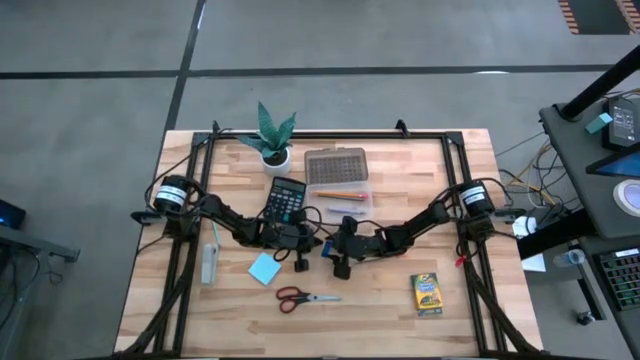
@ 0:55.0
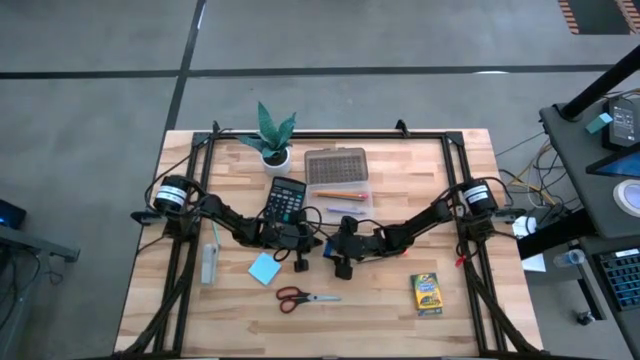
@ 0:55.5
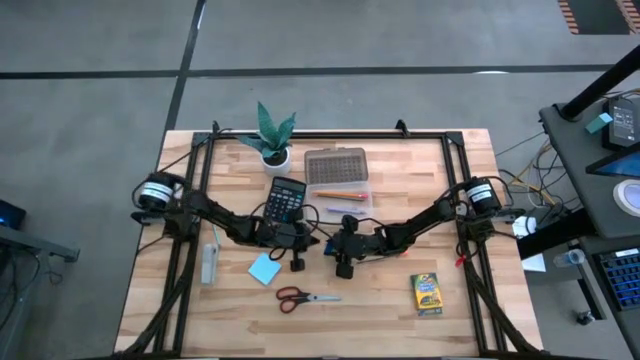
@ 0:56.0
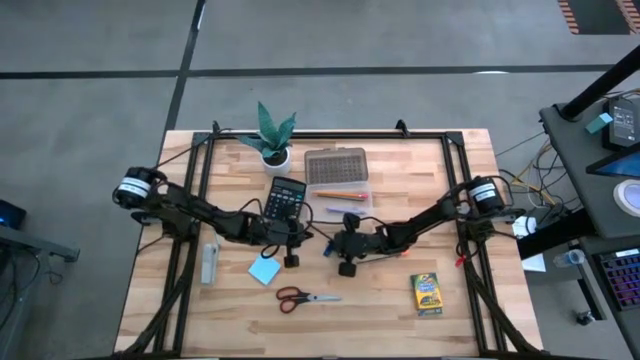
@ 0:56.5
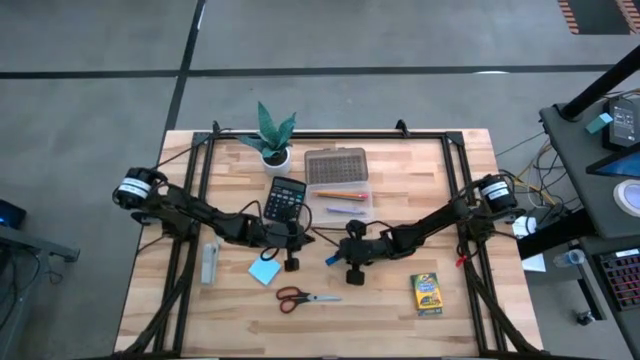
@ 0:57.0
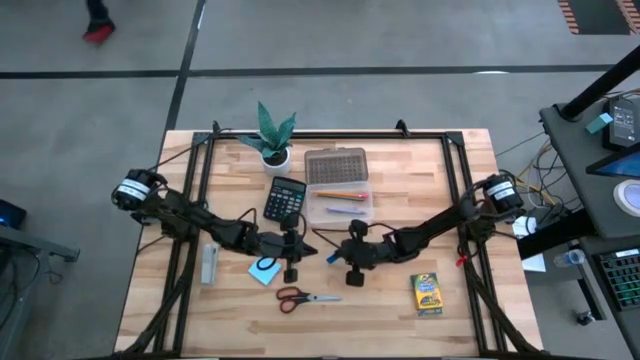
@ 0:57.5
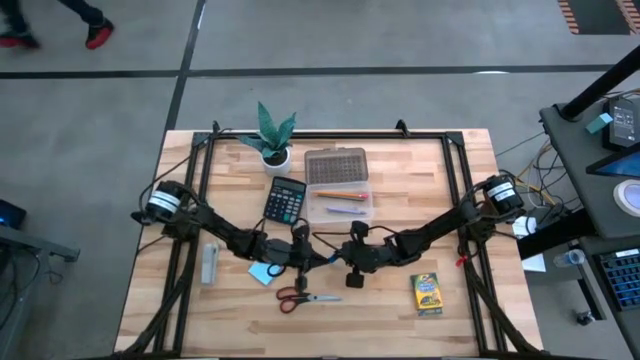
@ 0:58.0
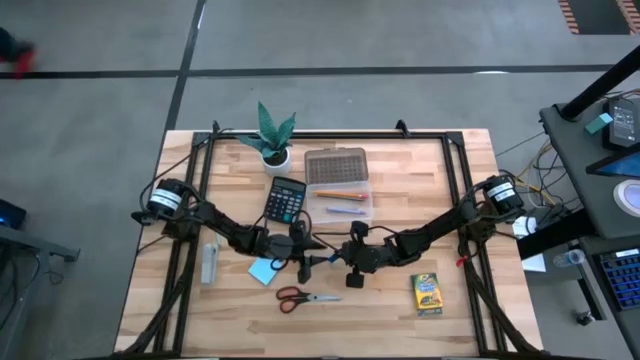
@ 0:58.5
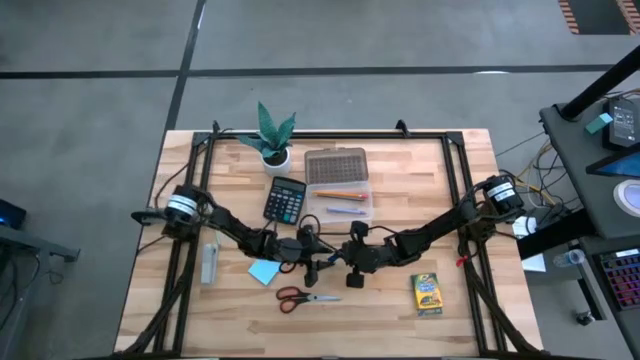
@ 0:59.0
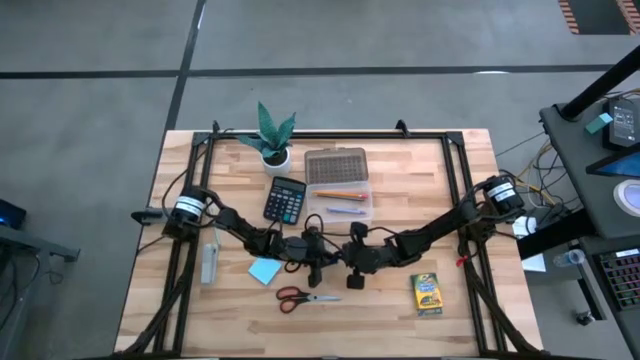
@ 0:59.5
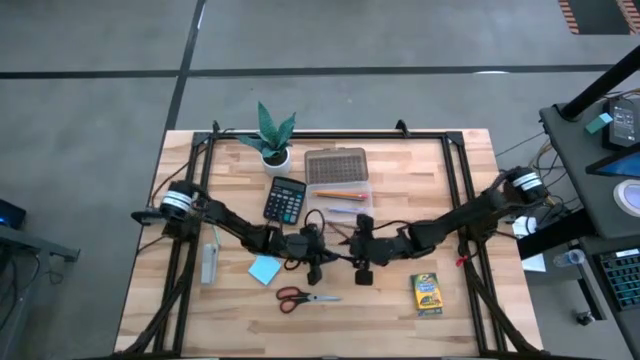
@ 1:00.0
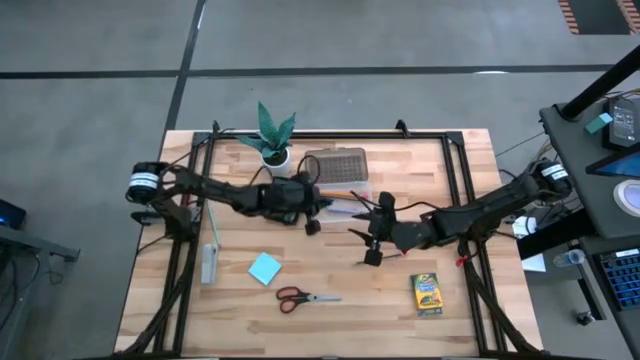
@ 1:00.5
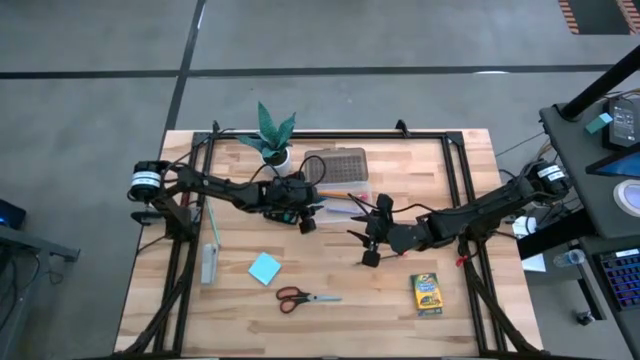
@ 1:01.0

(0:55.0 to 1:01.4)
Task: Pack school essentials
Put the blue eraser into the supplies box

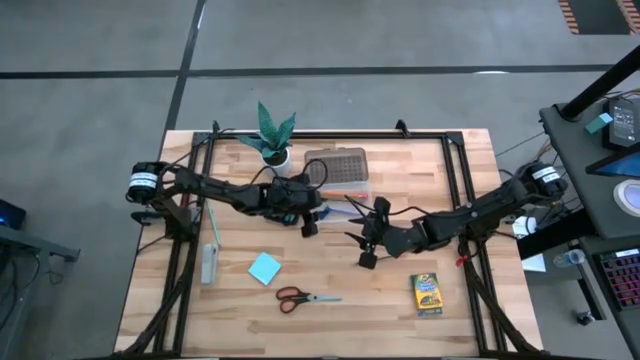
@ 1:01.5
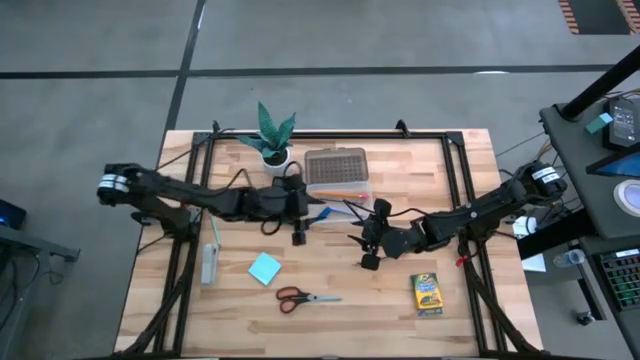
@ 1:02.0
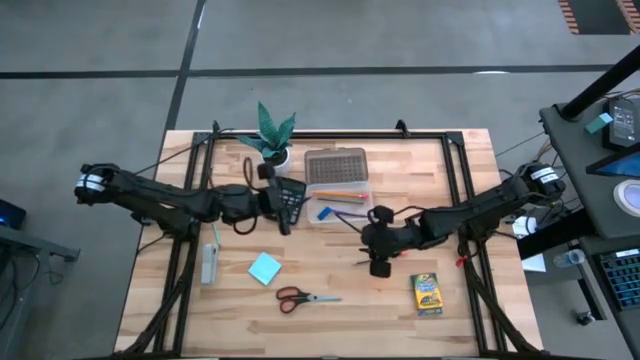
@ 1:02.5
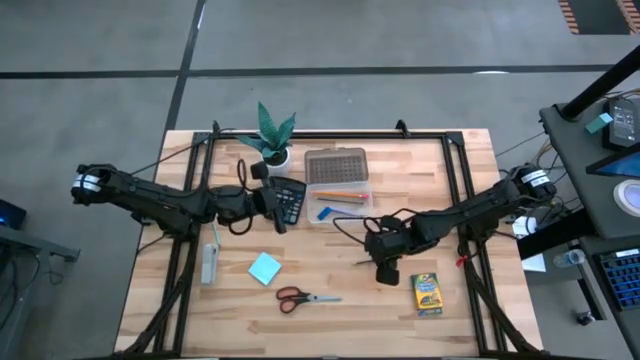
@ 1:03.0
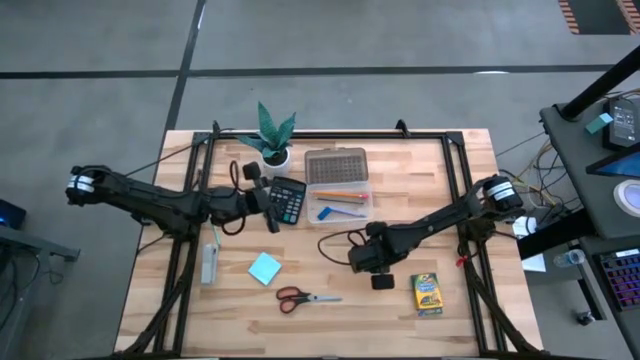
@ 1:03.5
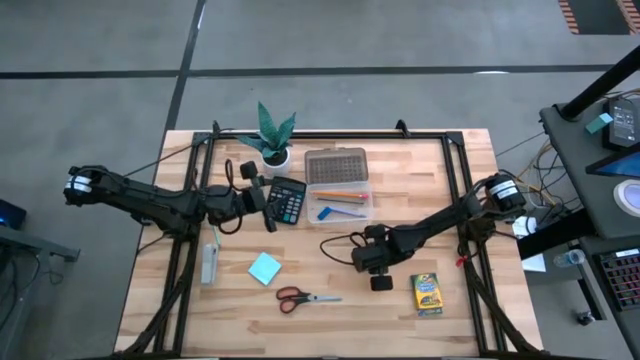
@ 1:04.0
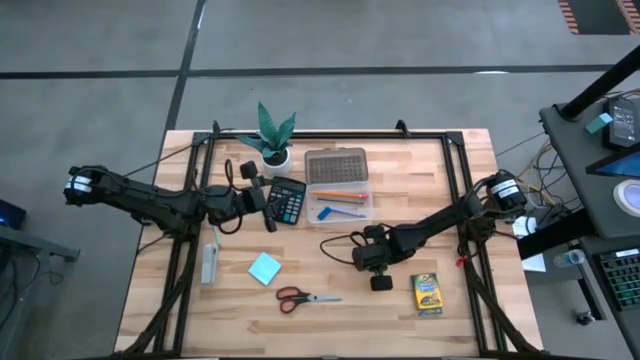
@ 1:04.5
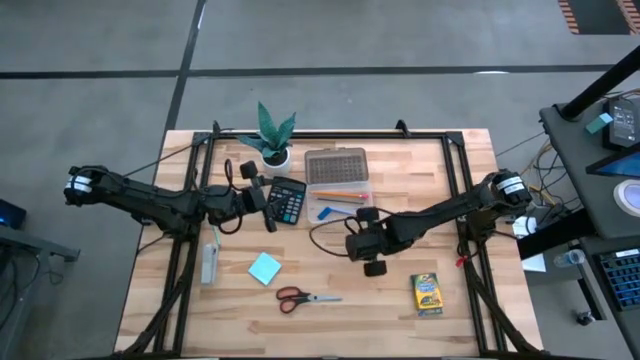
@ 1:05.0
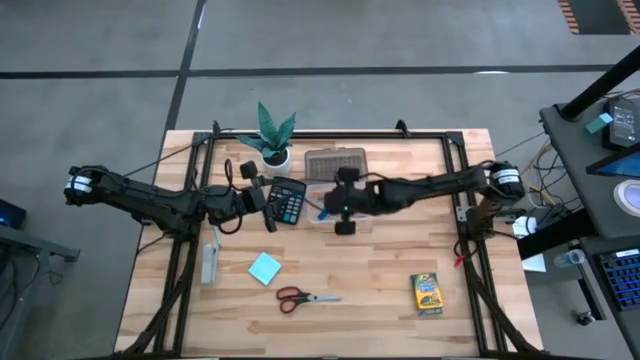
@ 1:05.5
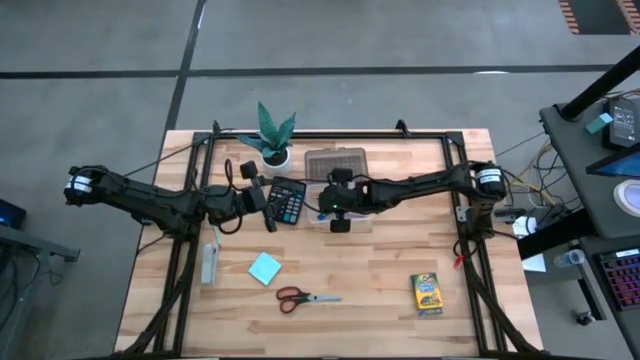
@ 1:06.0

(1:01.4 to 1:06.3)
Put the black and orange pencil into the supplies box

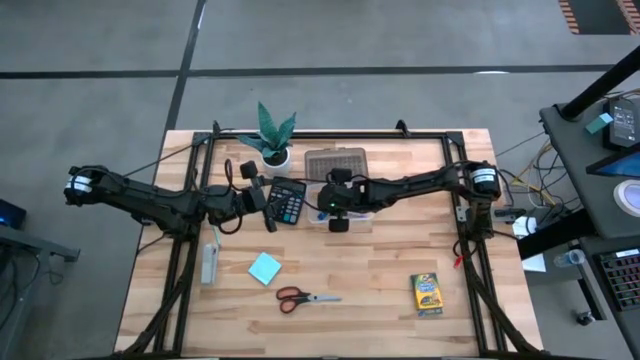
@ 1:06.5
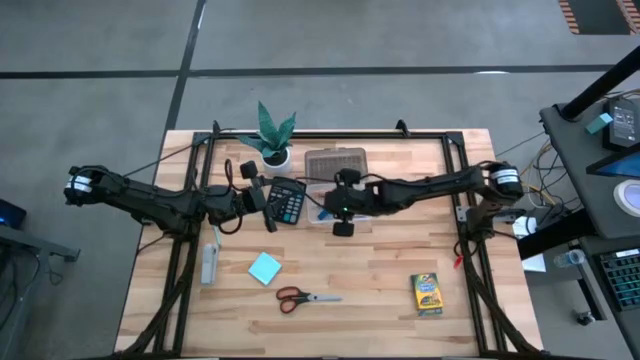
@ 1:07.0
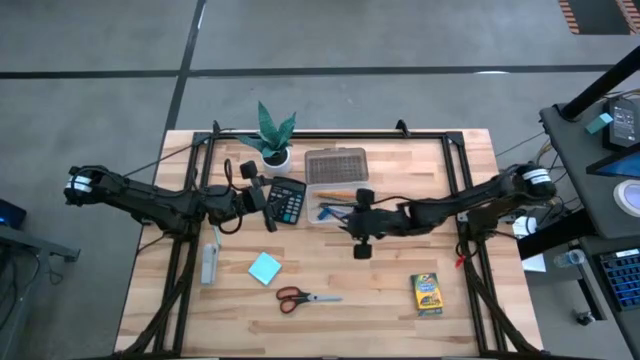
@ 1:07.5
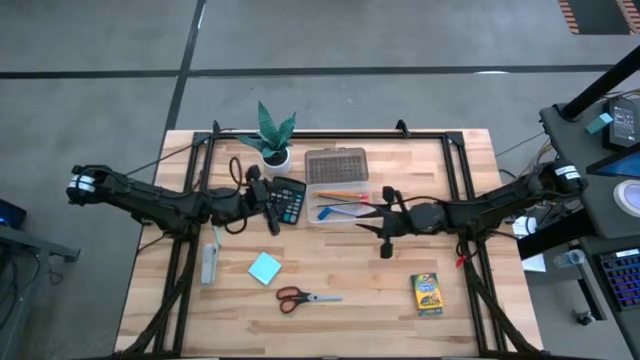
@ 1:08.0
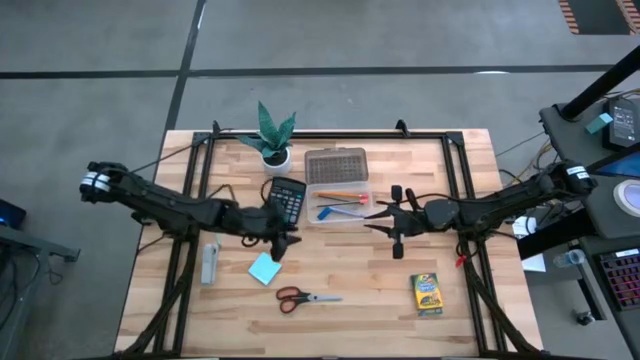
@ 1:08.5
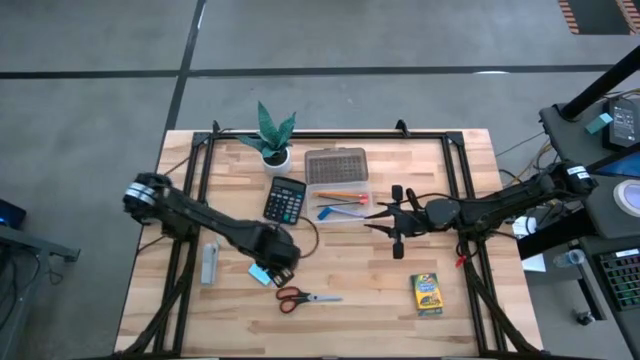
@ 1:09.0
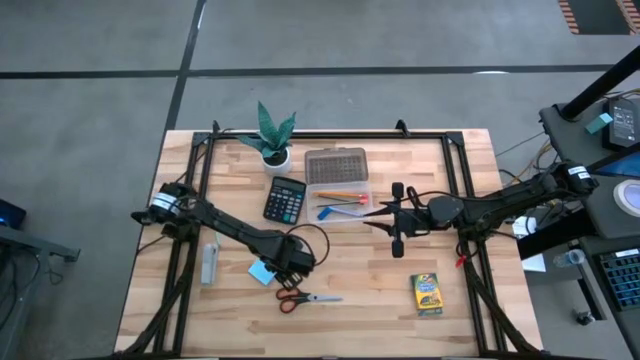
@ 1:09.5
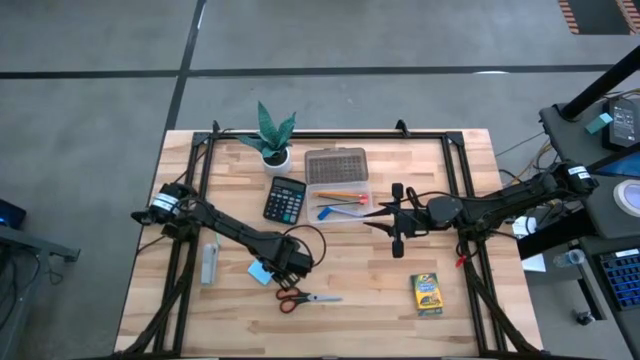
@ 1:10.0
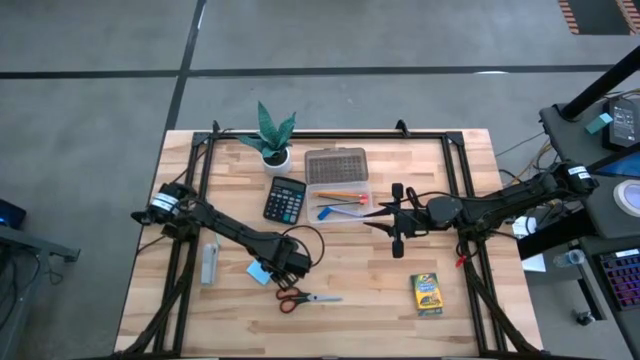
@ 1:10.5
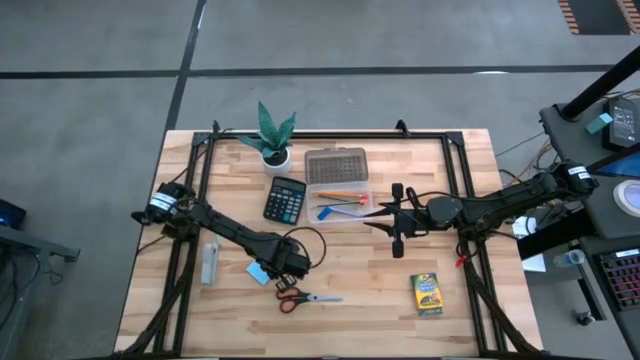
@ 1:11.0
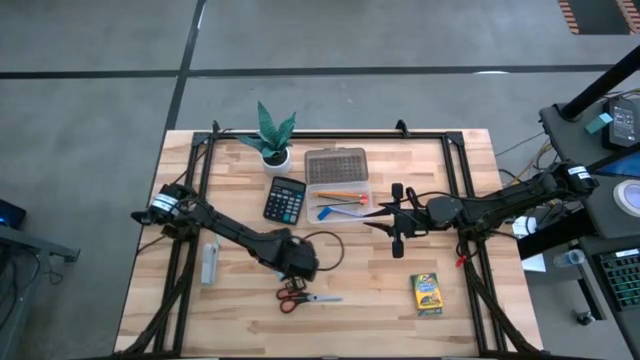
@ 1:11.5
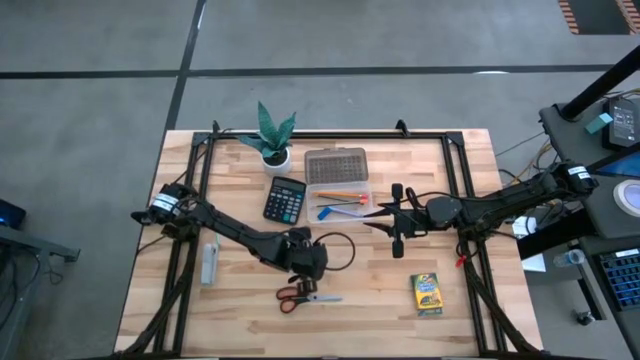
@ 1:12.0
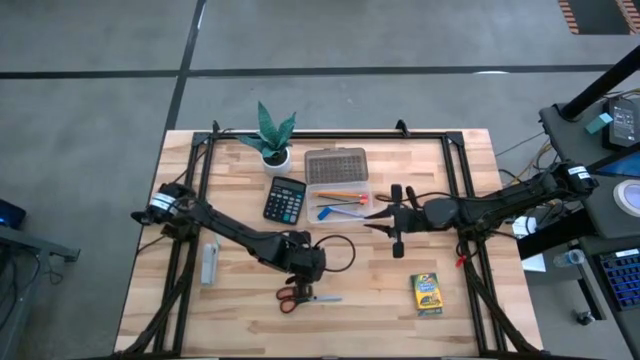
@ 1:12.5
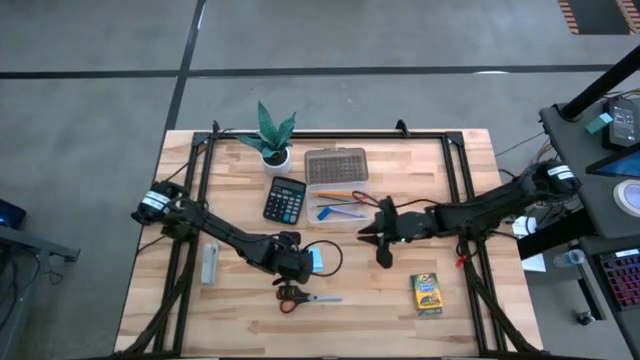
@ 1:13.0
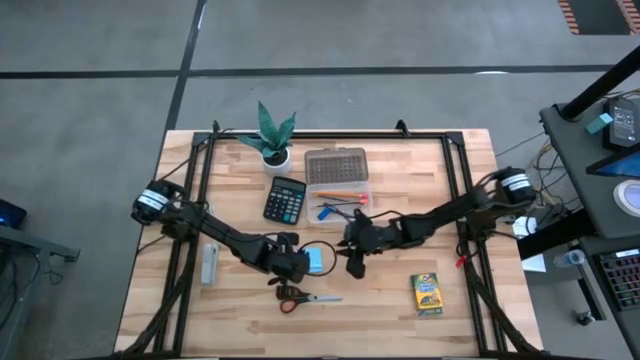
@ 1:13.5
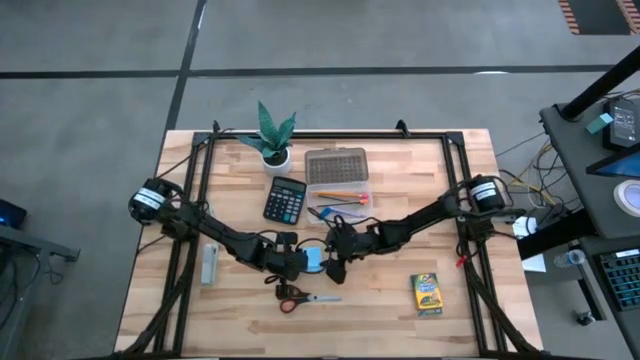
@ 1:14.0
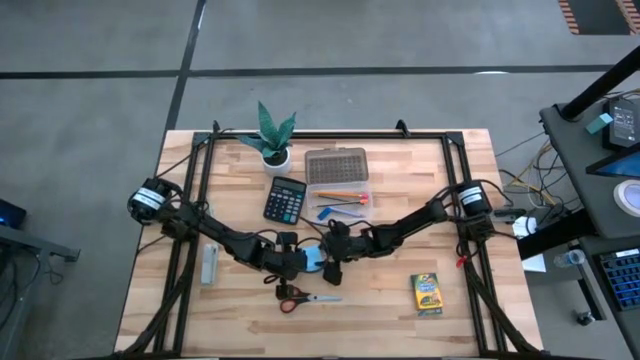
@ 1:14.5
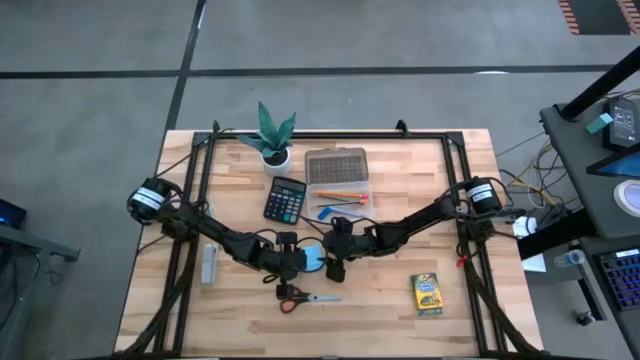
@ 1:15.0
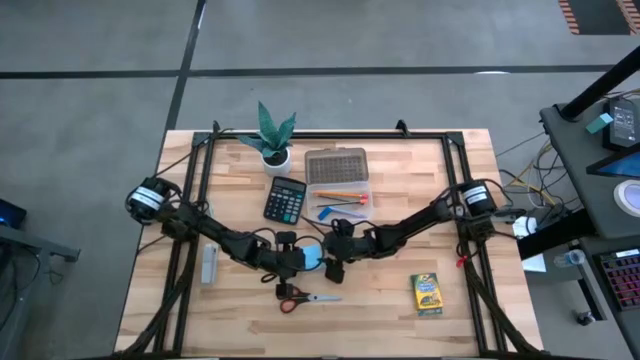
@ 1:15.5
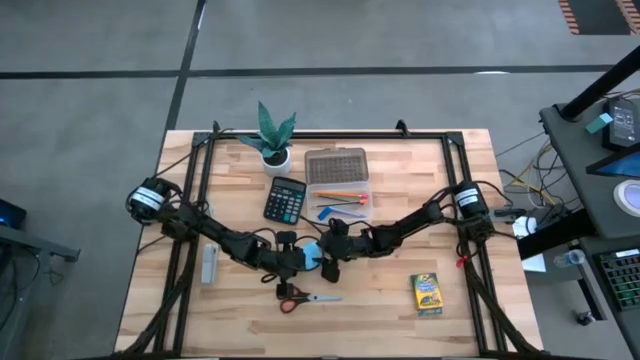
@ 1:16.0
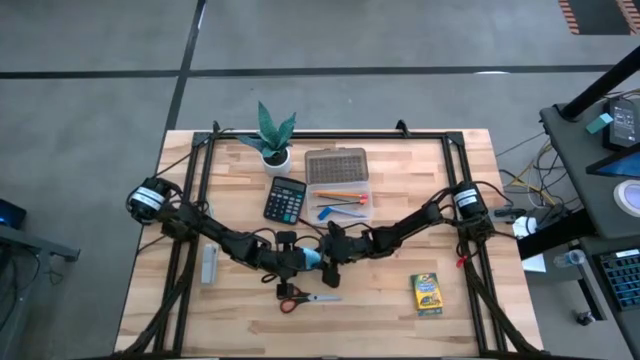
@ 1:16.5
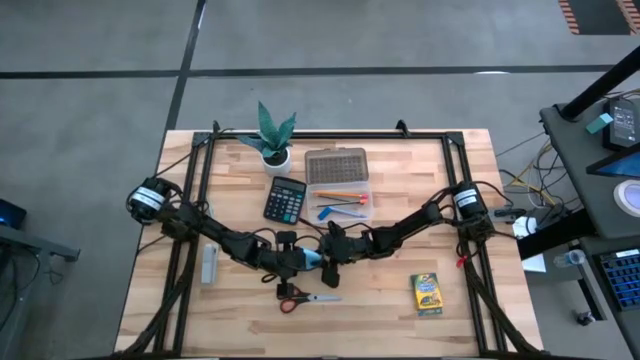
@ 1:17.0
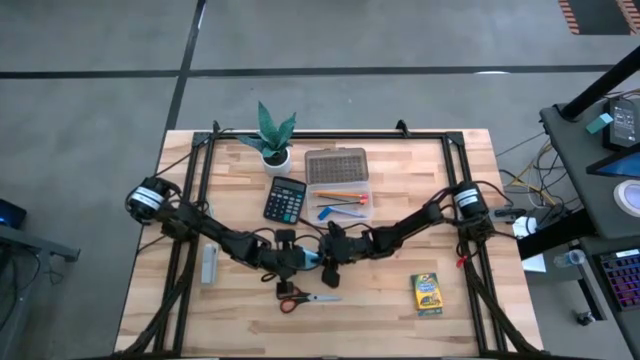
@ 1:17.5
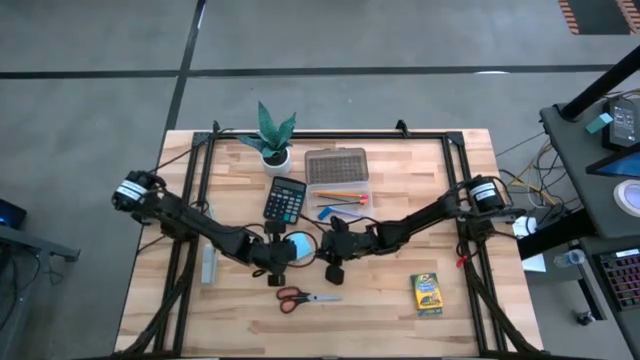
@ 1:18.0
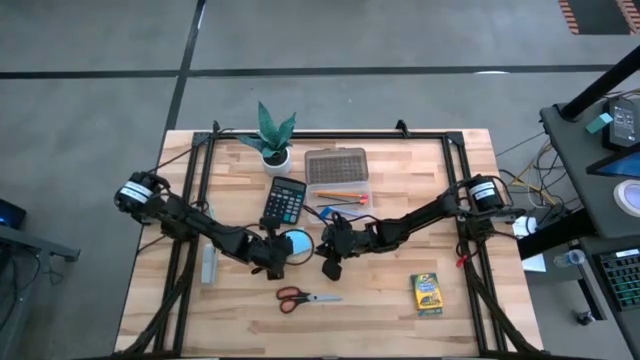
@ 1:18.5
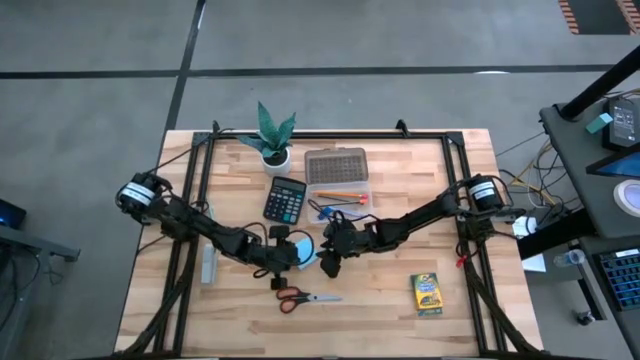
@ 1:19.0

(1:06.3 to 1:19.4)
Put the blue sticky note into the supplies box
